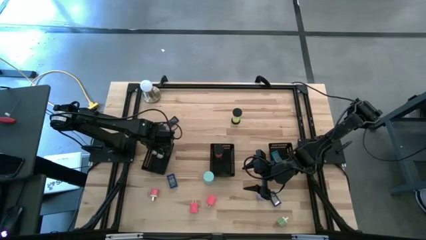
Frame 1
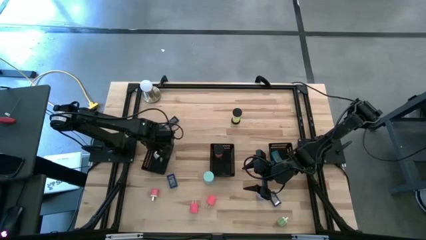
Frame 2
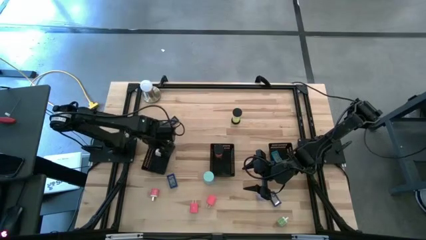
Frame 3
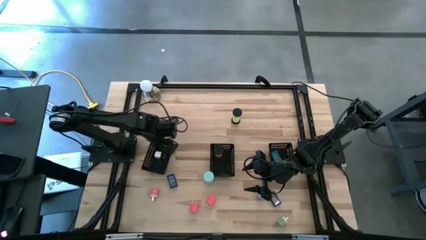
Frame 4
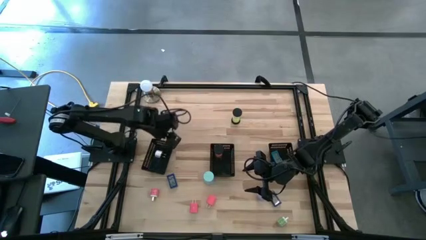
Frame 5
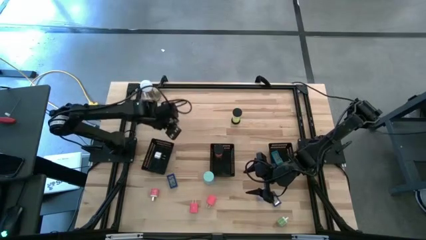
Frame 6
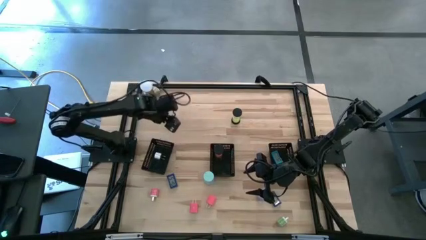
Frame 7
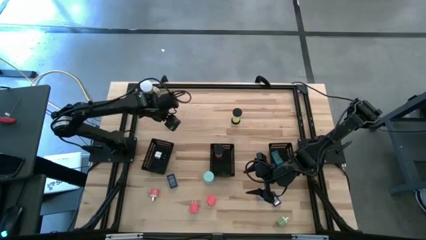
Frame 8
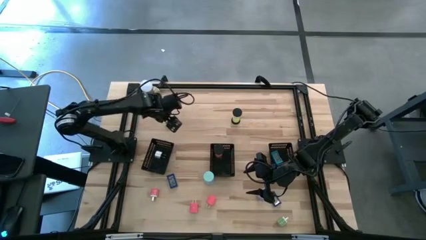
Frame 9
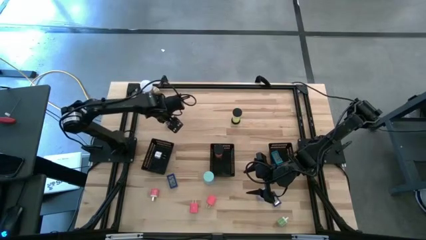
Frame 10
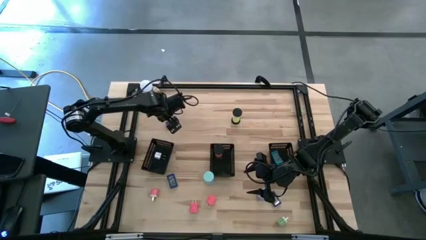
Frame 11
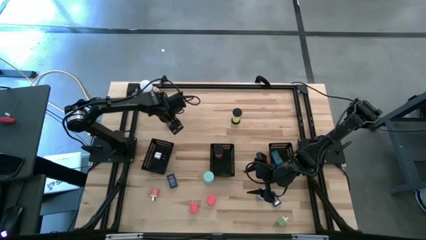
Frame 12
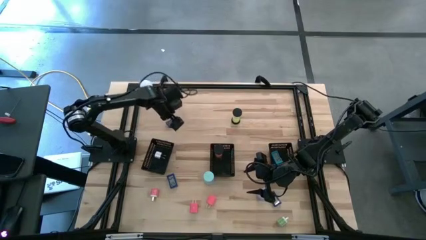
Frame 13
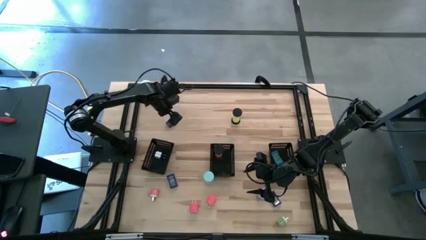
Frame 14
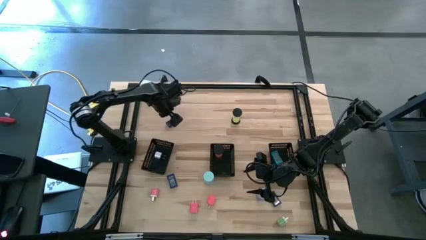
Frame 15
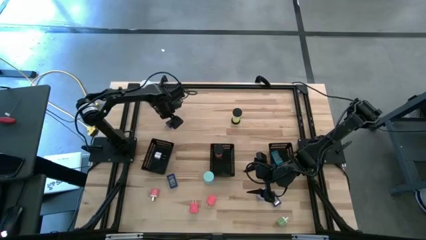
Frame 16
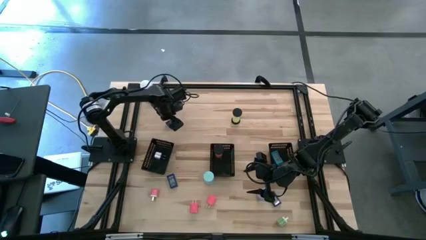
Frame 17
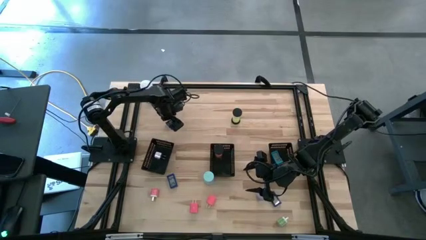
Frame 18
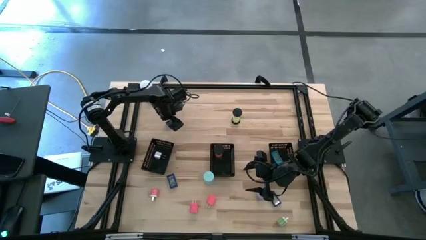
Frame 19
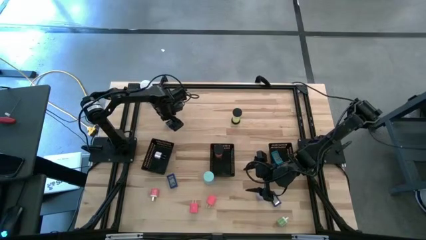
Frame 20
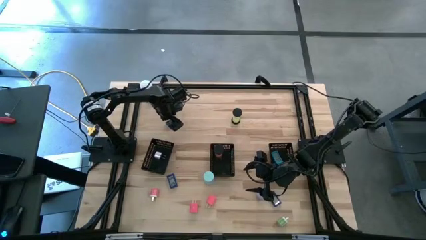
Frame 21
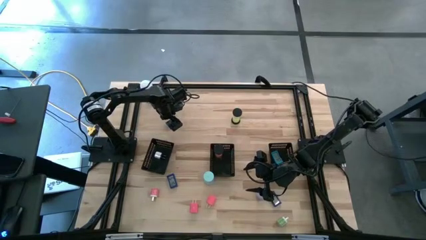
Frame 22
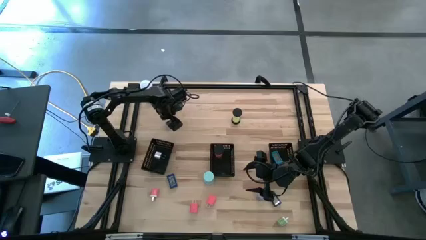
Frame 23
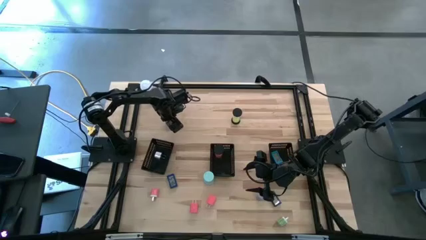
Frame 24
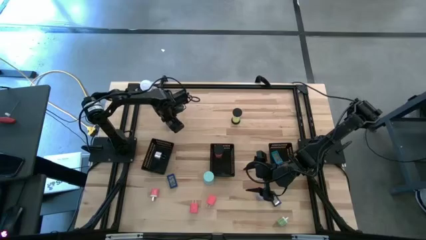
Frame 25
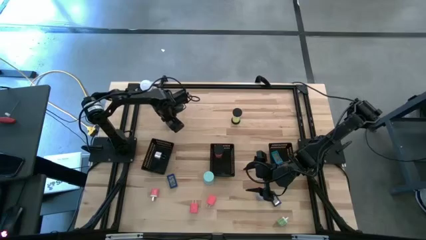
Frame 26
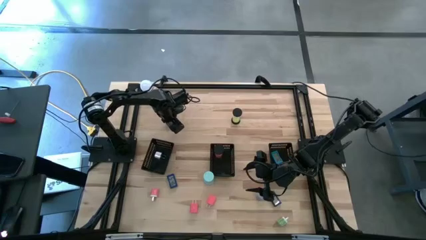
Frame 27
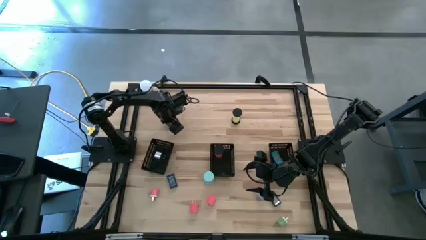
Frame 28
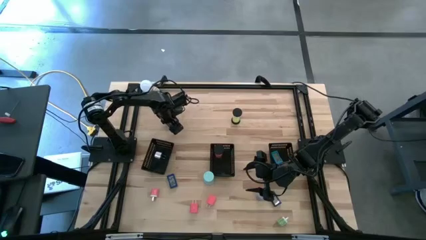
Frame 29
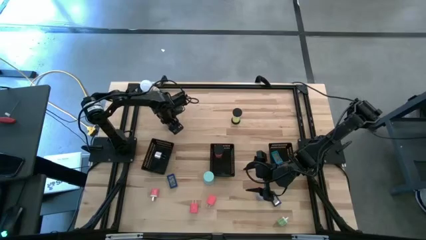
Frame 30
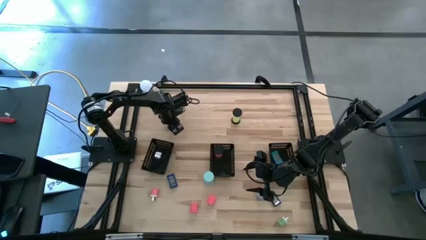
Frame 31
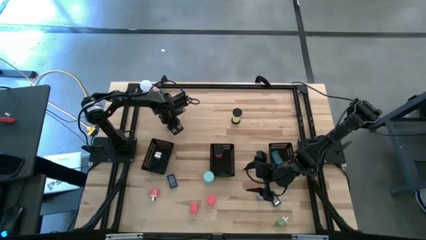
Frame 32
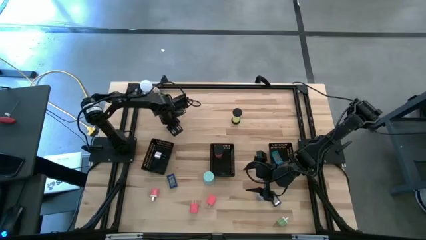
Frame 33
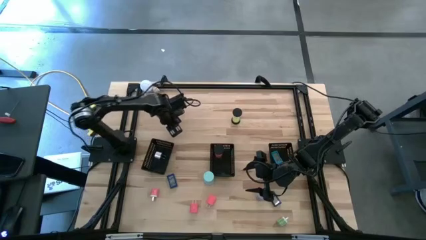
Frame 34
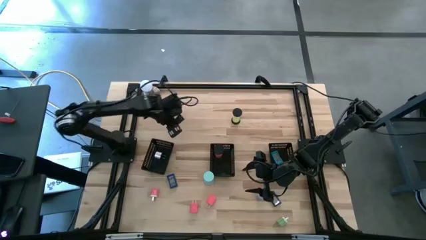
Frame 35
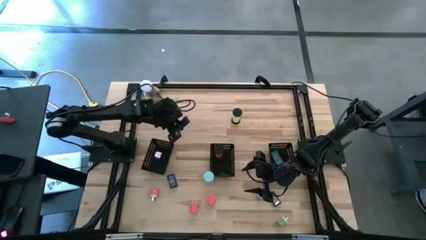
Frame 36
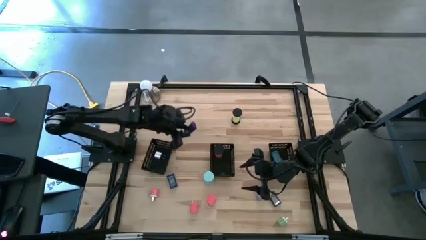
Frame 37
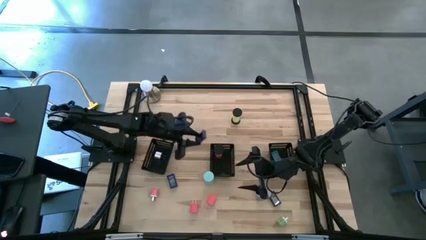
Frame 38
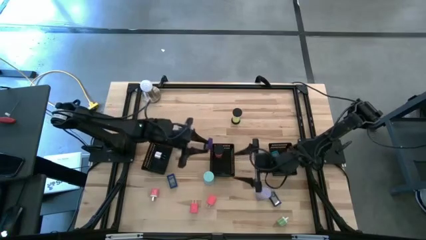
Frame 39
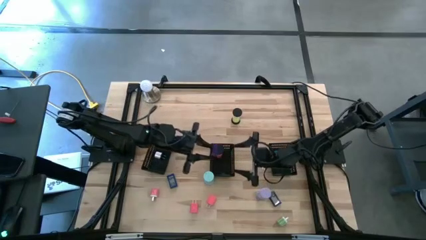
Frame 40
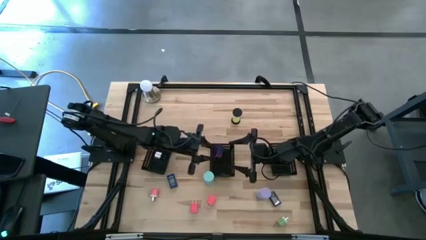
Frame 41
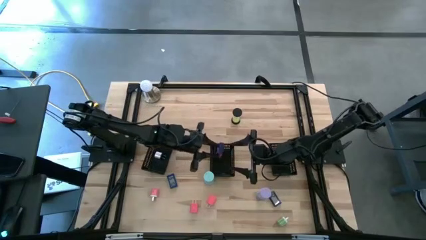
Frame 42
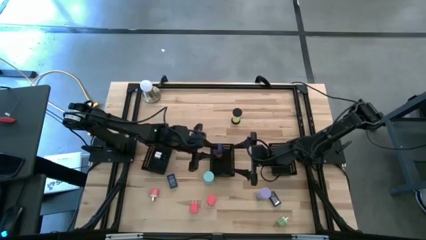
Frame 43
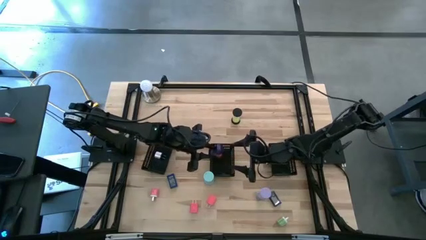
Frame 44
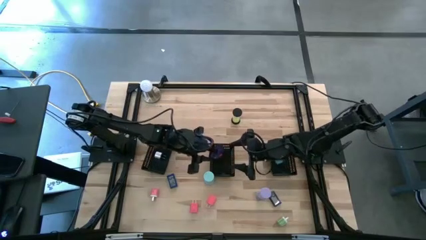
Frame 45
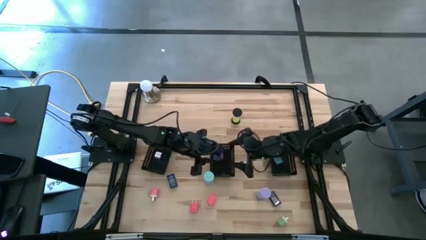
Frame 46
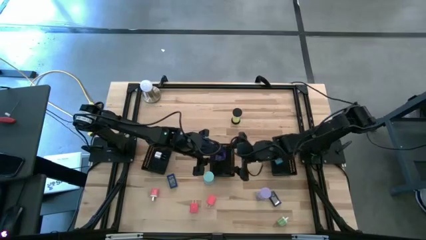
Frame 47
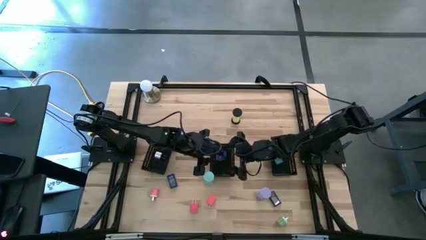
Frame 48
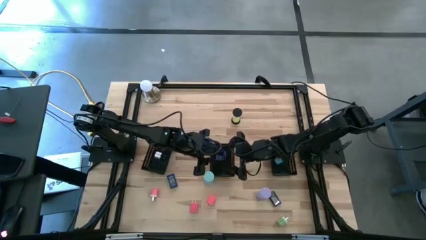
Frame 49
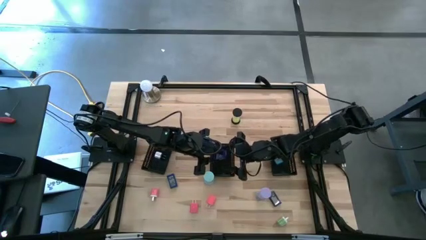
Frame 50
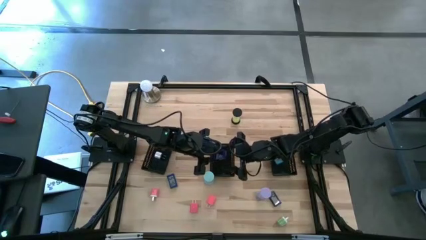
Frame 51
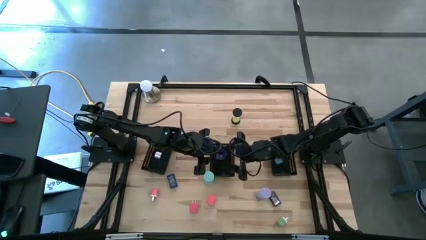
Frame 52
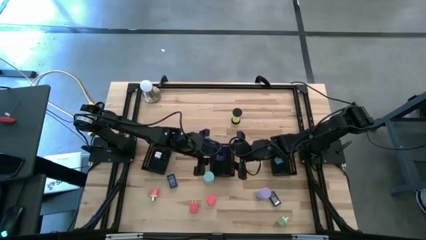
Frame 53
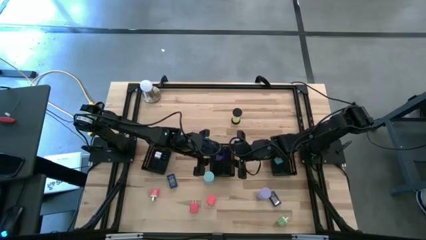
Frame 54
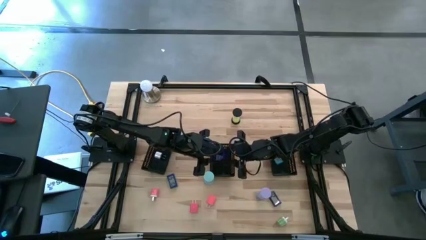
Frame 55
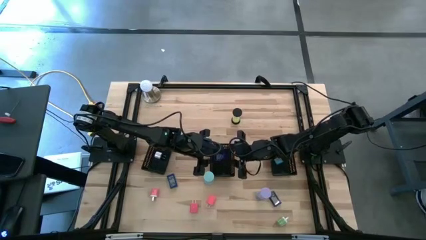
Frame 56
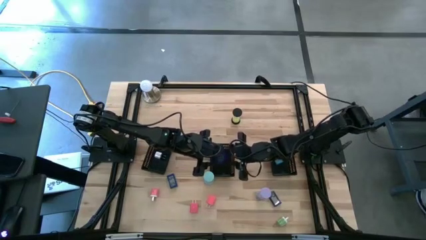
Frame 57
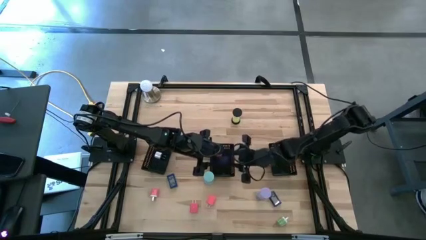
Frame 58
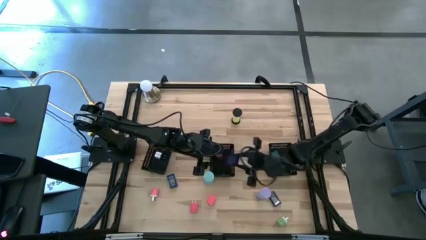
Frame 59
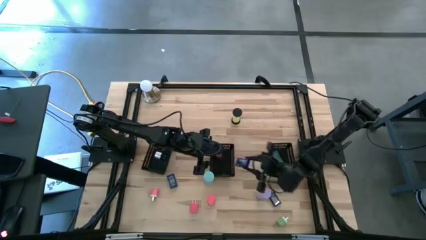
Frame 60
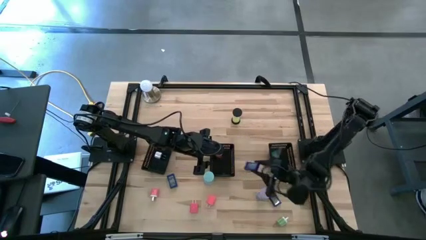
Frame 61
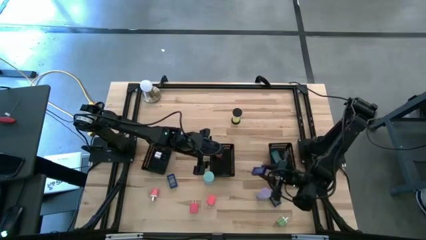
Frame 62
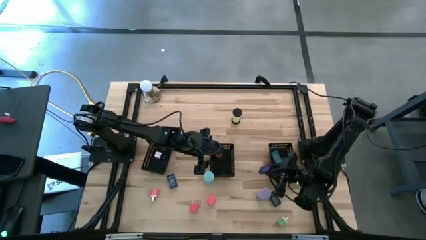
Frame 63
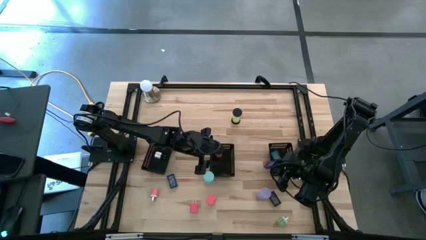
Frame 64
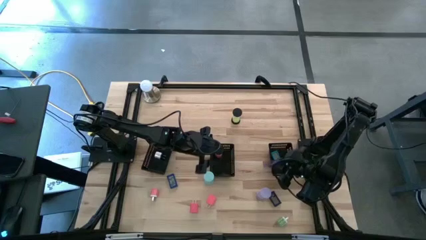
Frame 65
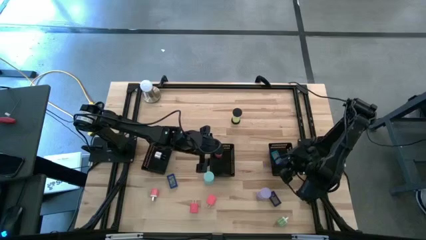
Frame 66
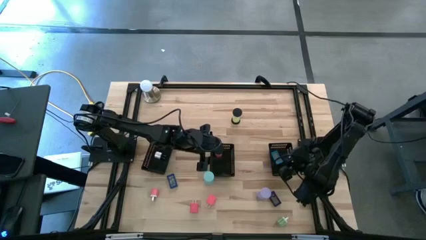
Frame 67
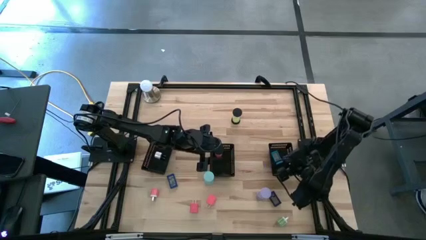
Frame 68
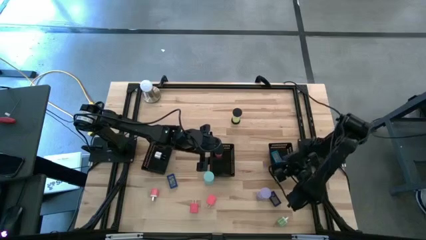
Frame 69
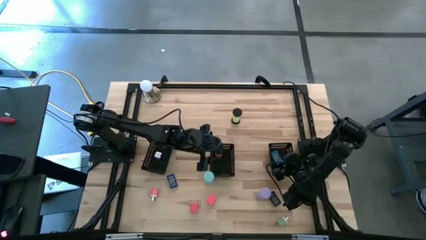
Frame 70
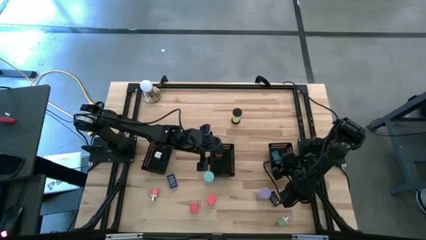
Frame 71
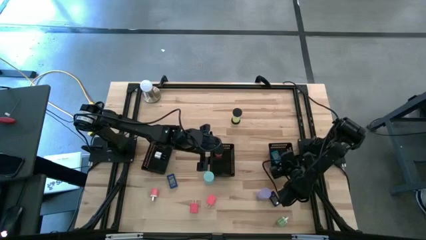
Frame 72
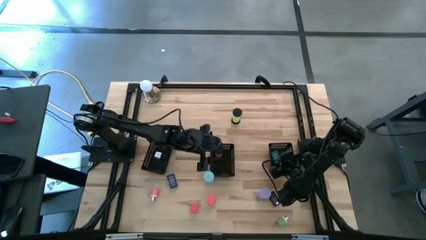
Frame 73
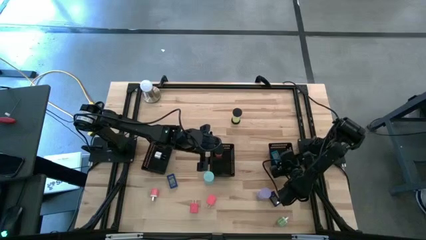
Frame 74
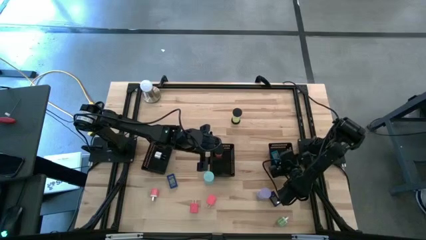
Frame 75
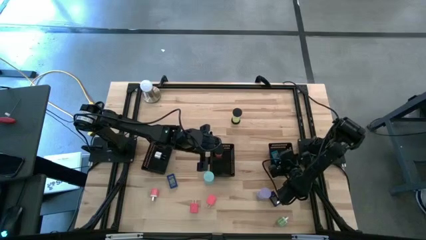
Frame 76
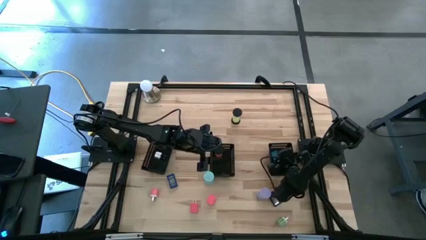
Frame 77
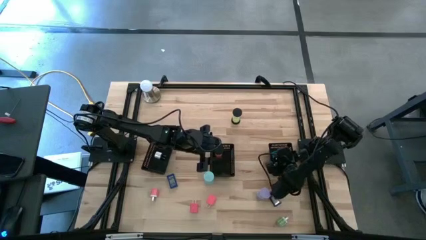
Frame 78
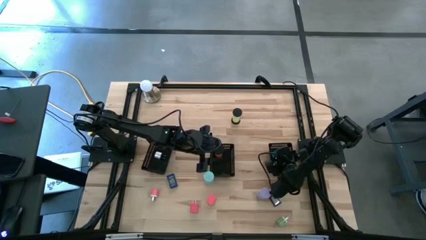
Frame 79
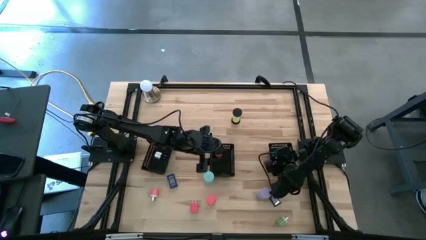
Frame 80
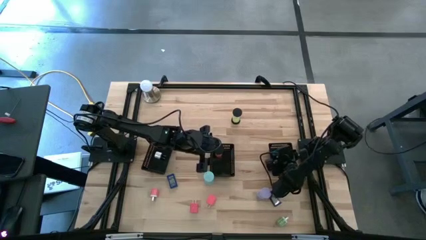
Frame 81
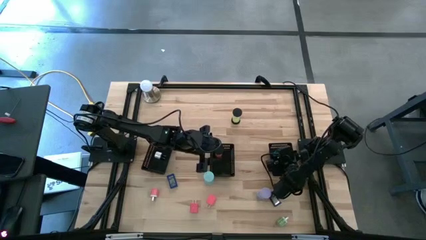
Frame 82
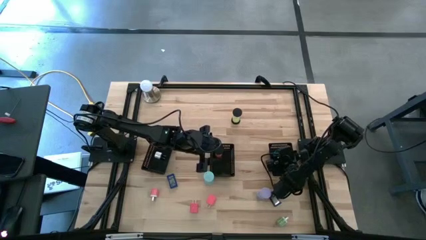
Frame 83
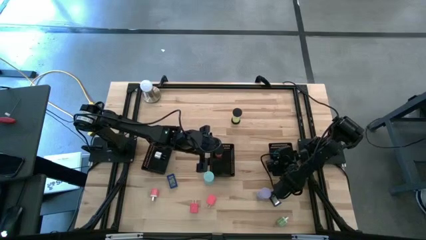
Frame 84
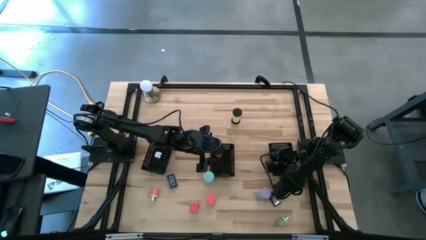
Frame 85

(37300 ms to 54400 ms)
Task: Pick & Place Office items
Put the top blue digital clock into the right black bin
